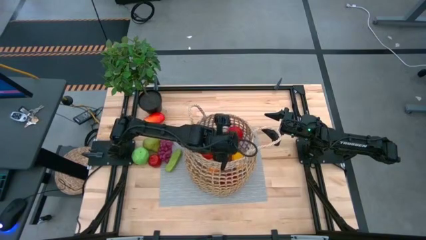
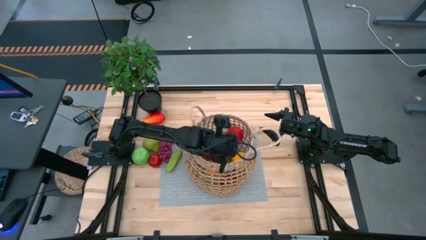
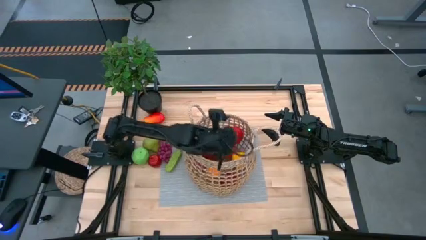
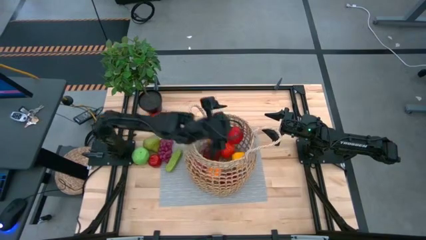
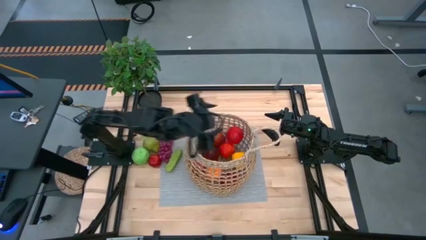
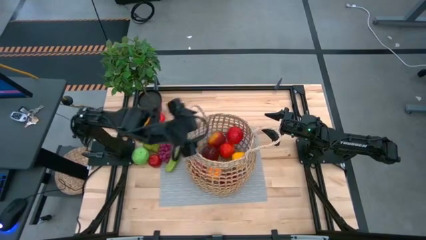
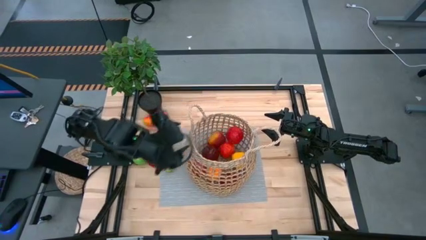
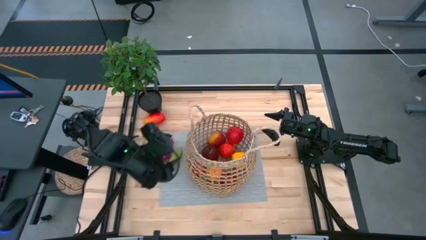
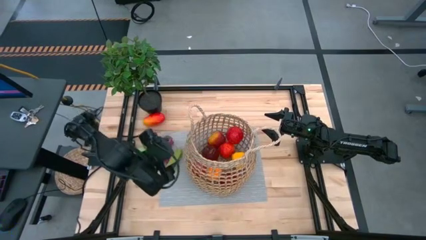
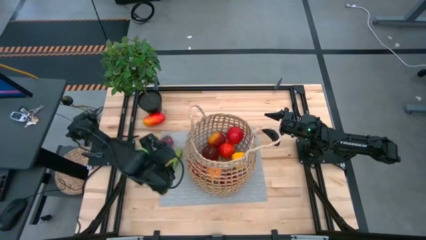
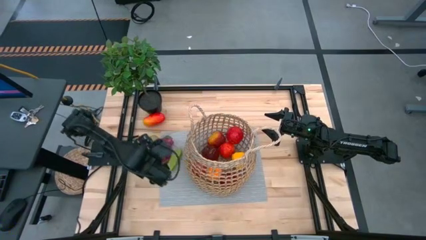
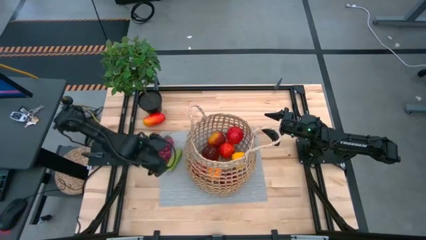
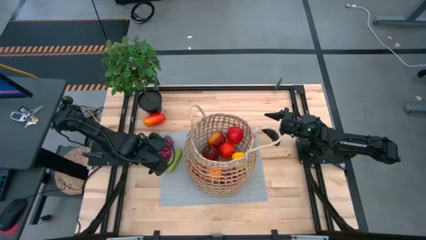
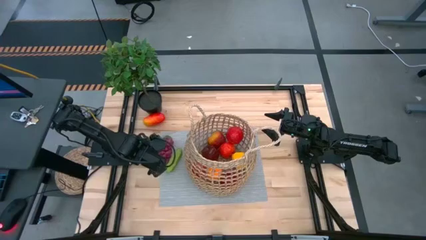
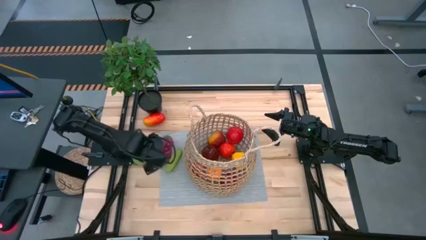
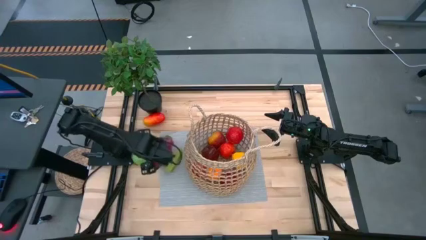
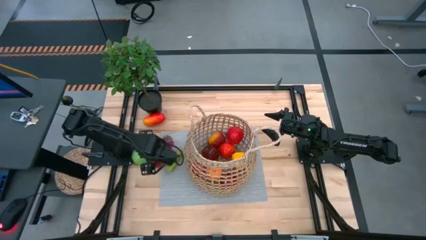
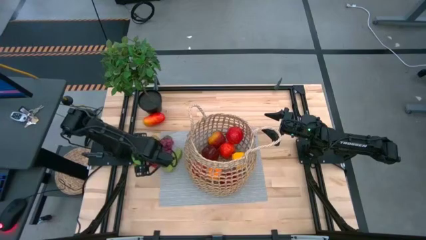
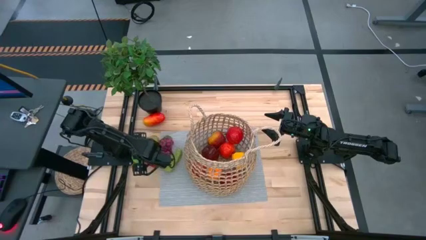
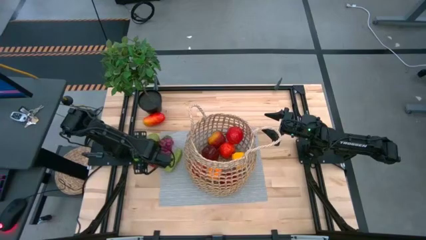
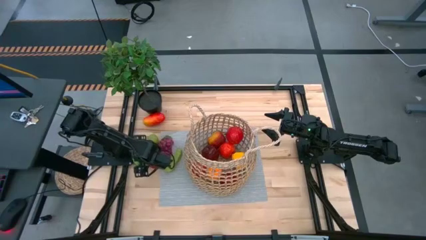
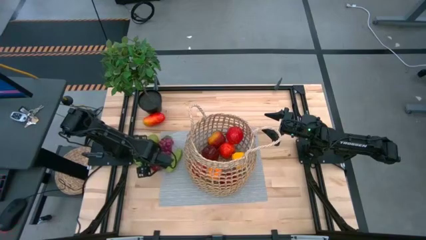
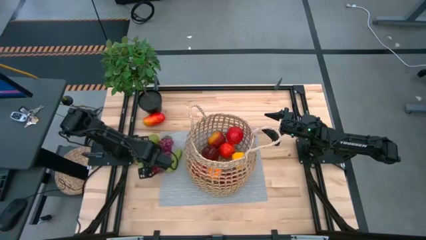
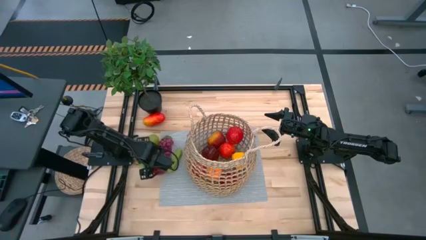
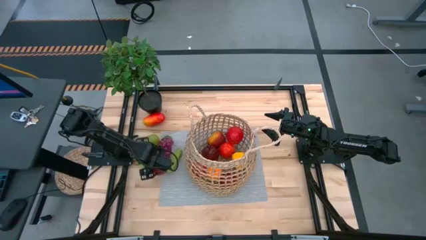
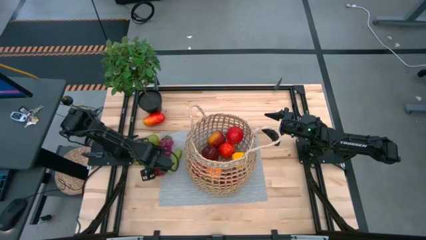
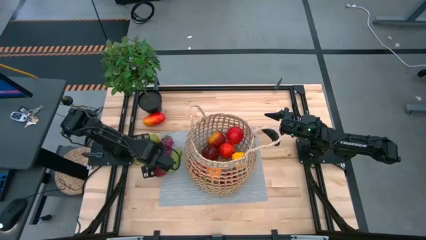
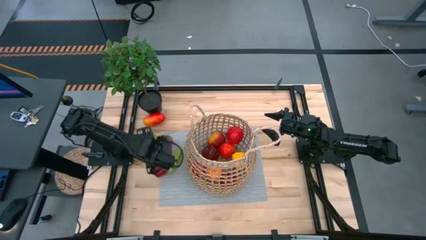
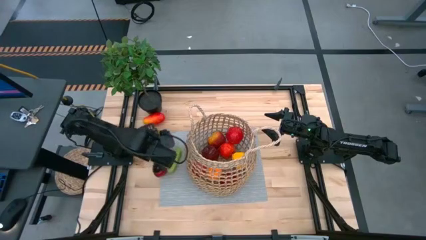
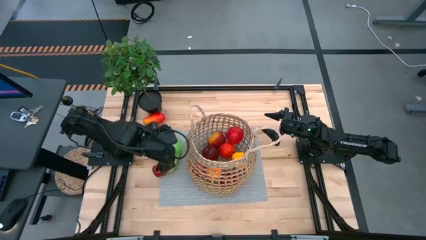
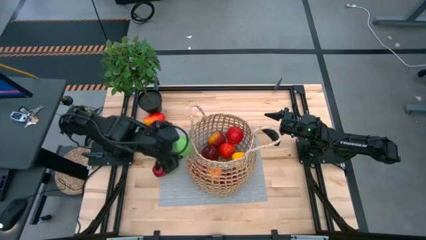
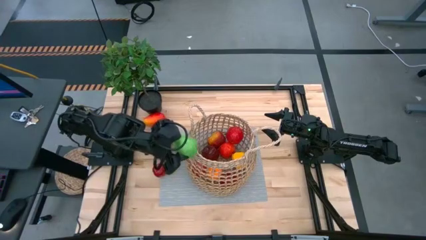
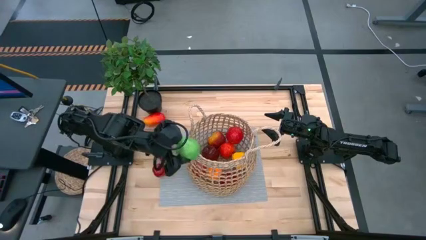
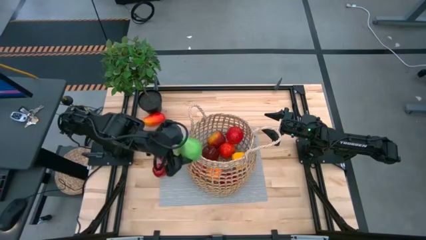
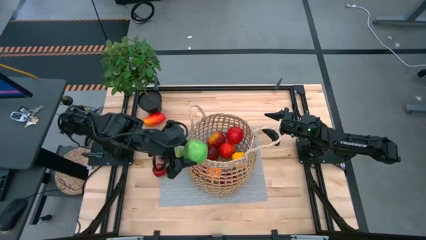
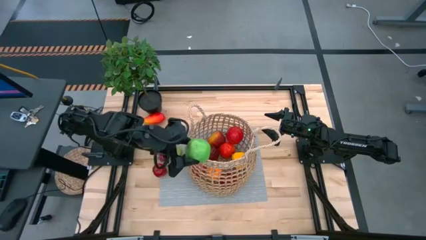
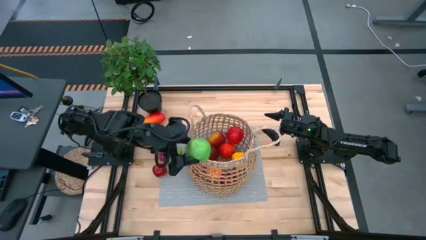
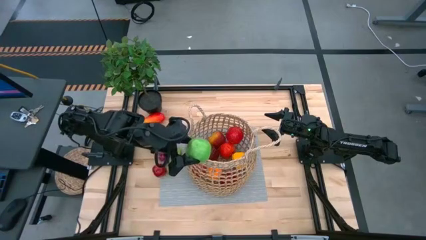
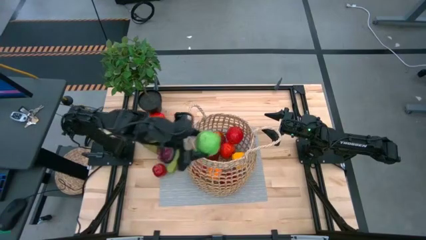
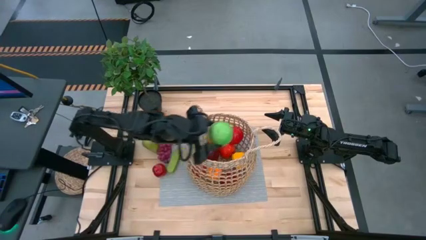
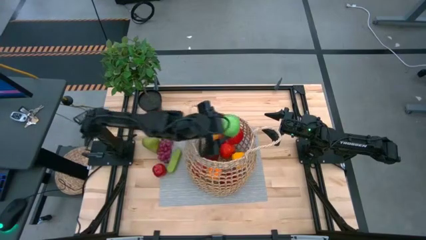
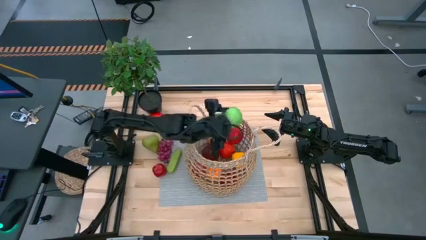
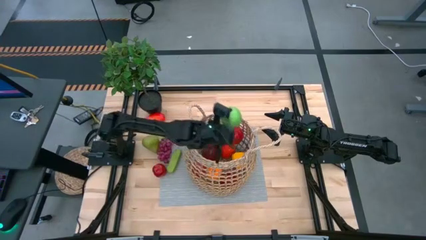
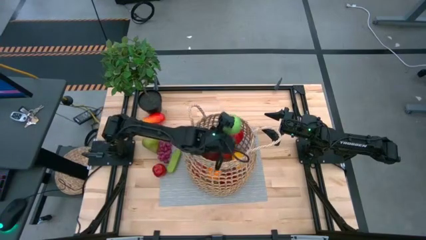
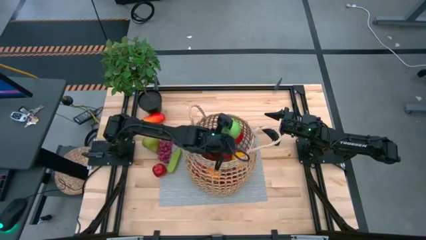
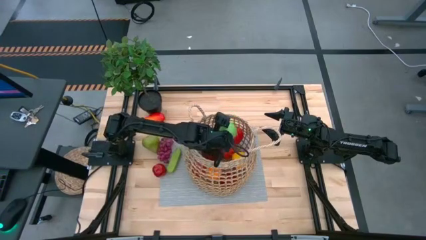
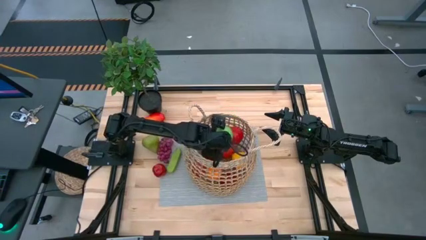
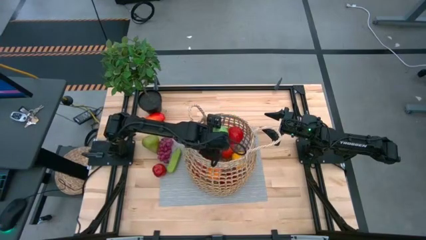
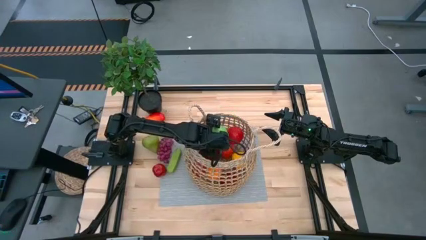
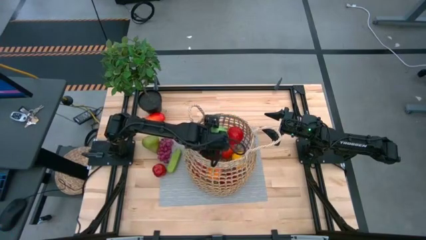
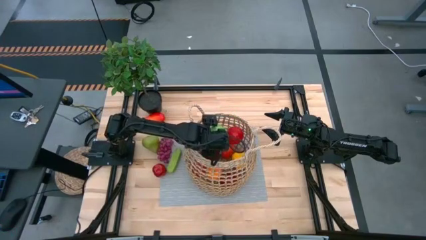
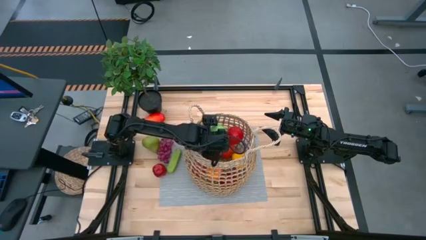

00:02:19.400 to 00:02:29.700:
Task: Build produce basket
Put the green apple into the brown basket

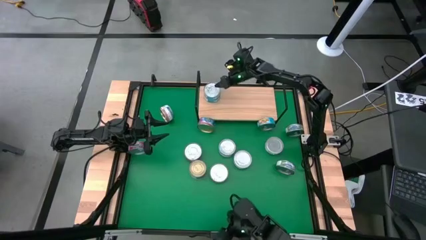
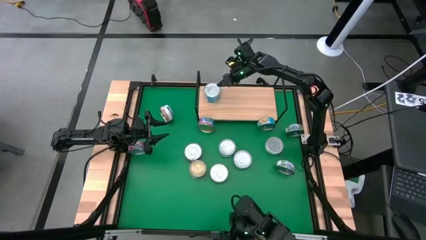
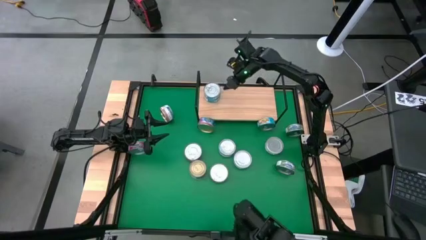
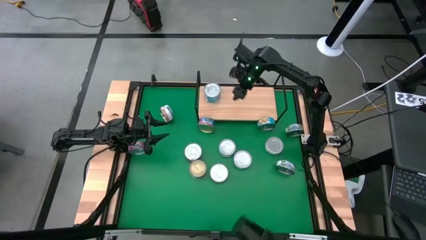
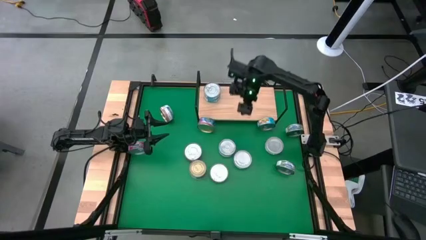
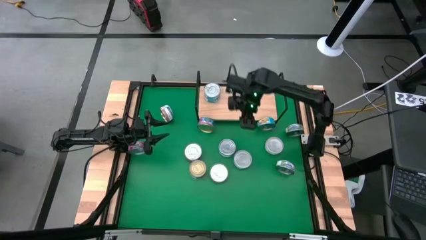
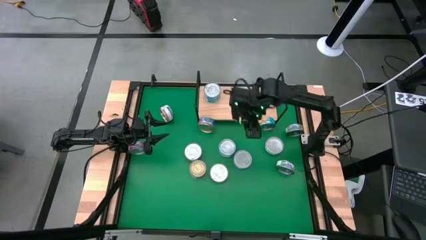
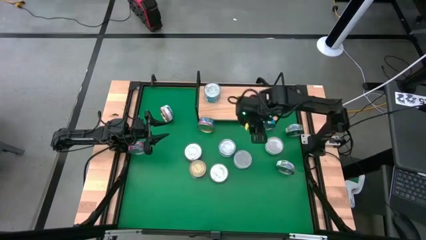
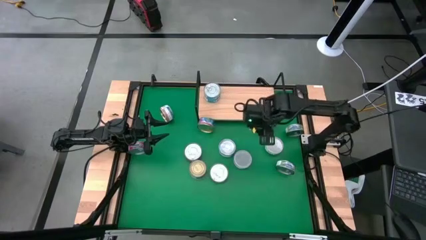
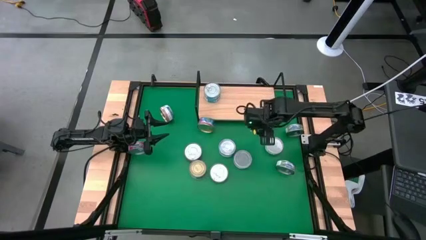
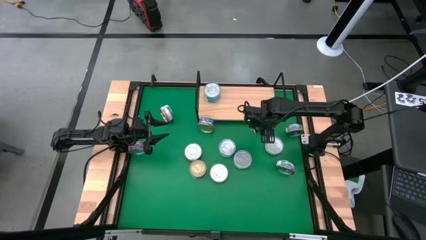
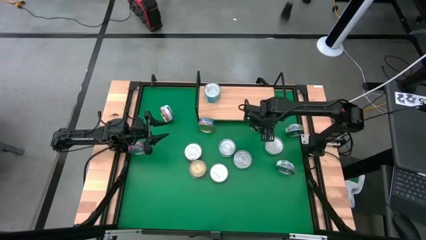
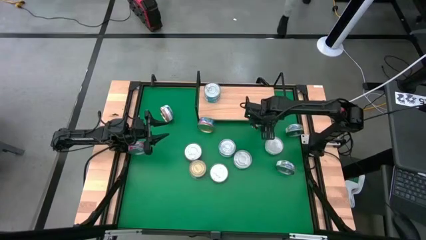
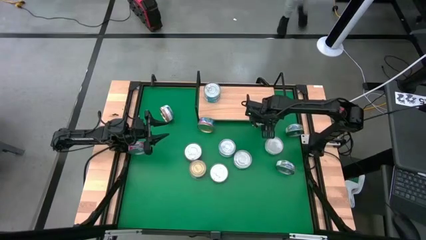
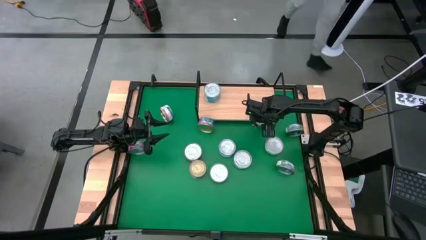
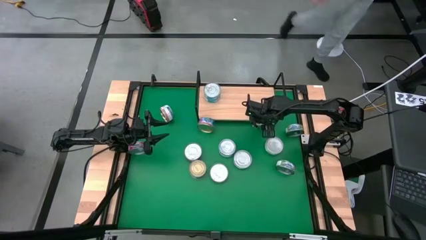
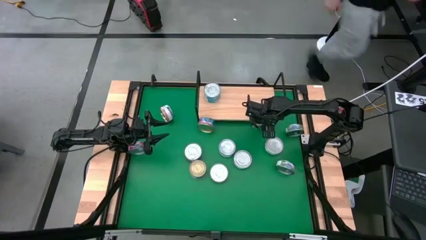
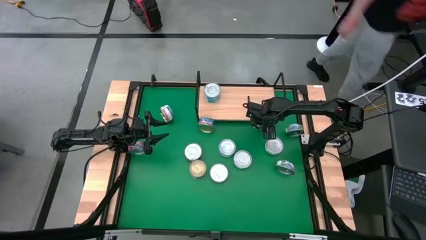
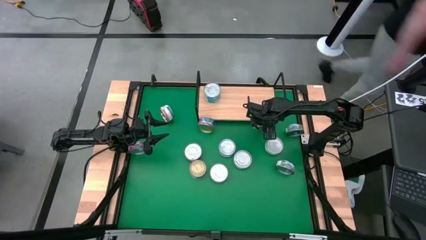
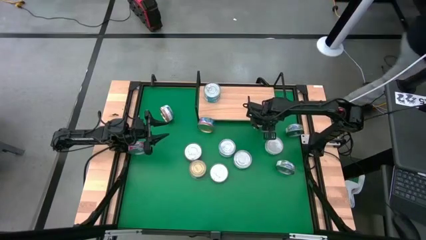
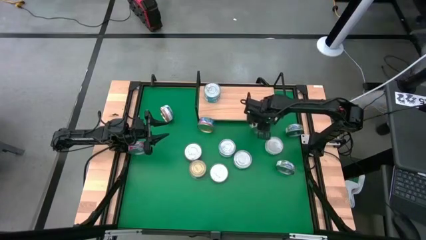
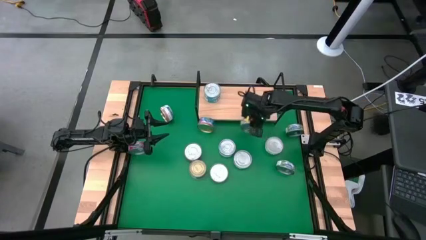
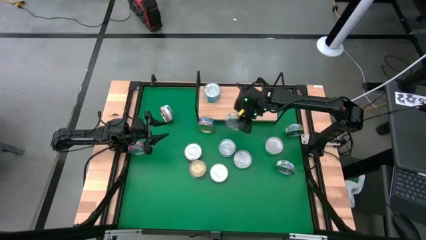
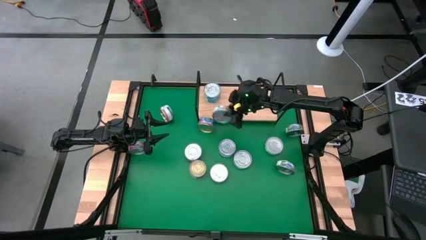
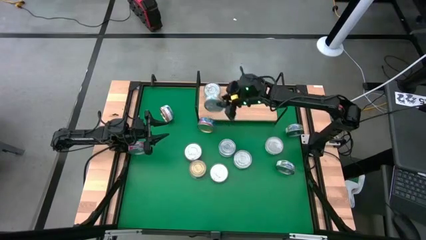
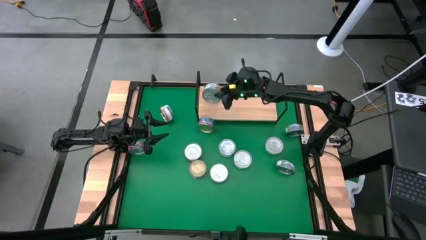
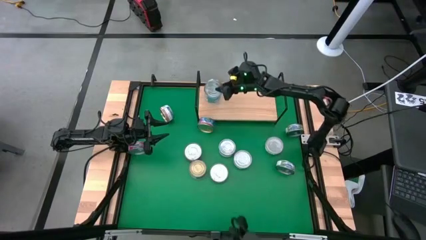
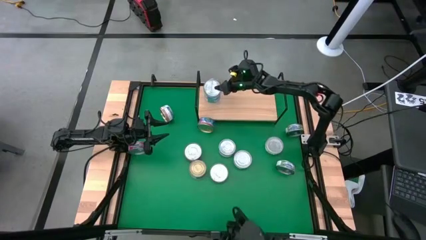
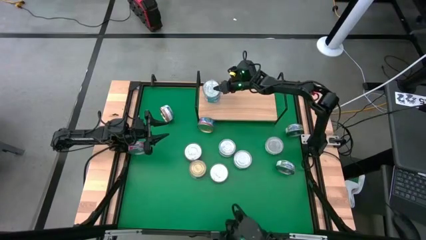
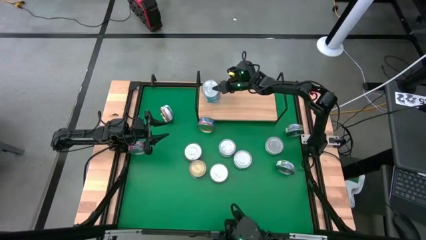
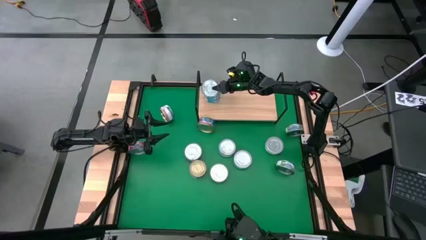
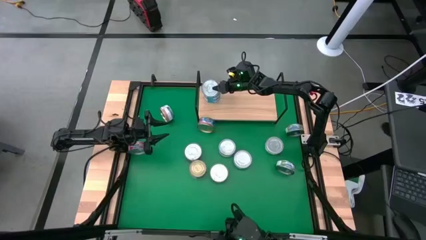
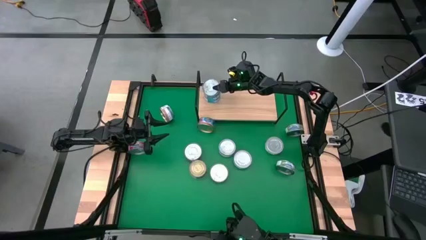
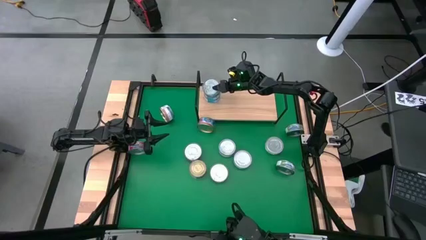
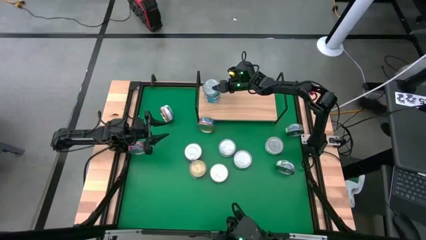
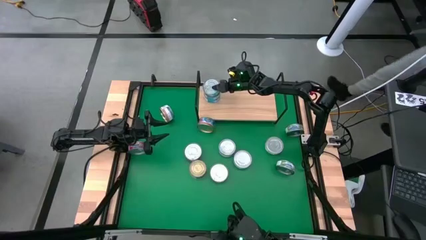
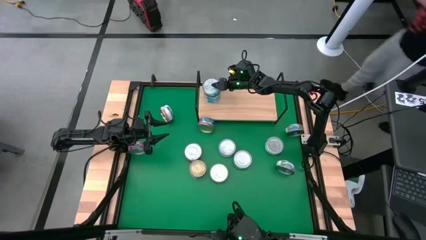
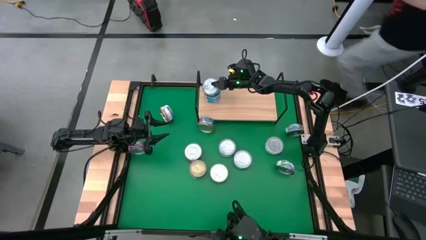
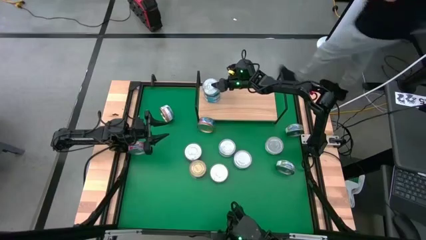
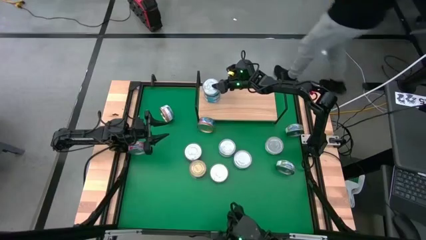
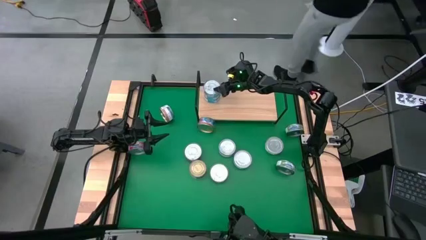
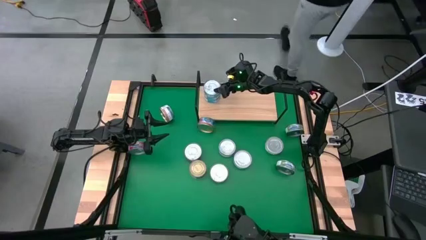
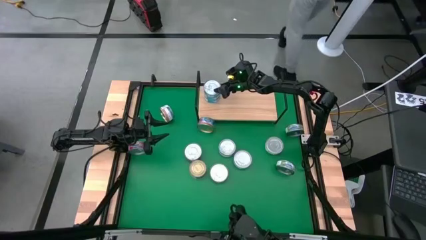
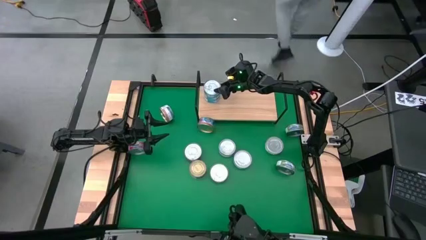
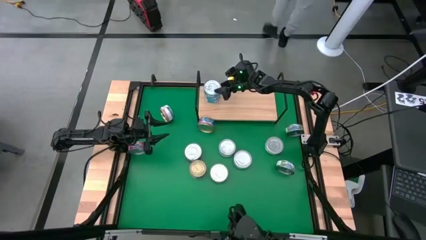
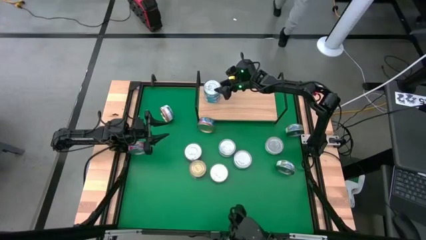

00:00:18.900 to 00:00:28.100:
Task: Stack canned seafood by type on shelf
Stack the yellow blue tuna can on top of the yellow blue tuna cans on the shelf
